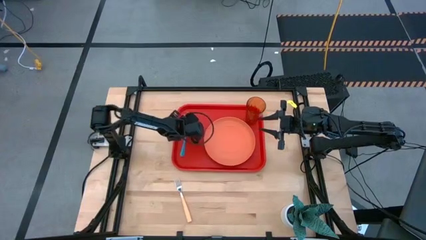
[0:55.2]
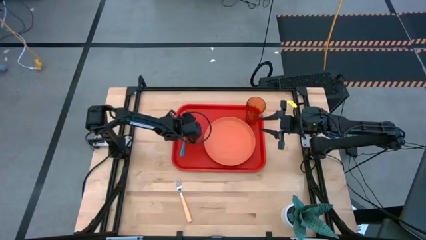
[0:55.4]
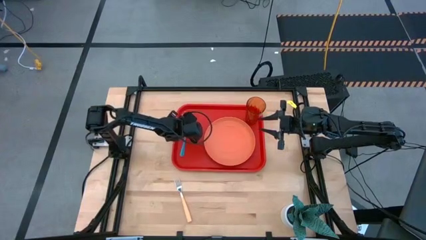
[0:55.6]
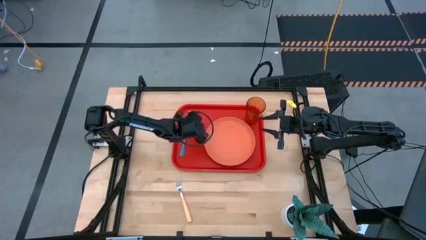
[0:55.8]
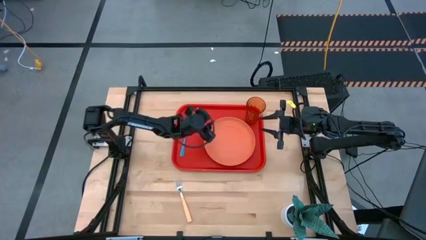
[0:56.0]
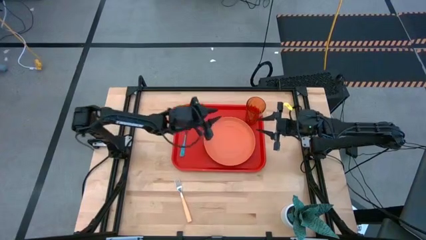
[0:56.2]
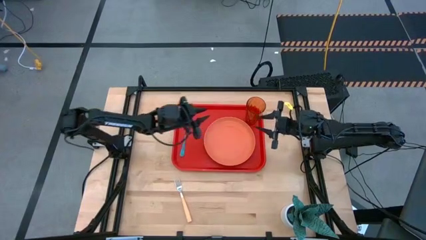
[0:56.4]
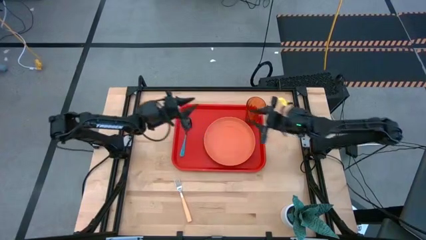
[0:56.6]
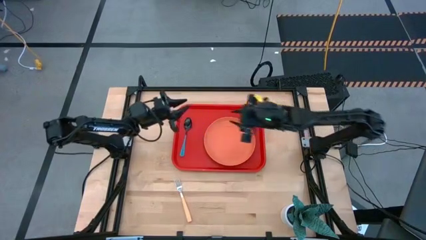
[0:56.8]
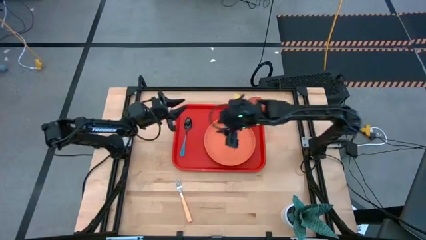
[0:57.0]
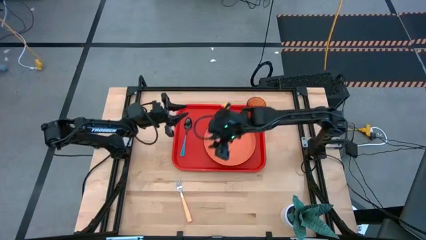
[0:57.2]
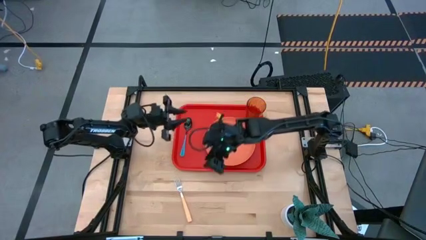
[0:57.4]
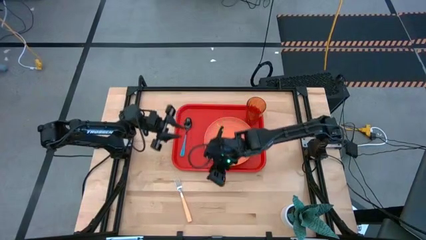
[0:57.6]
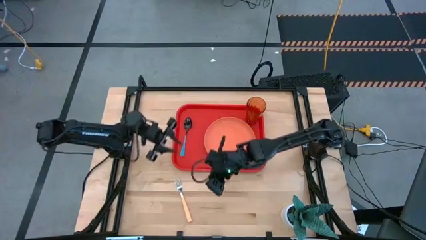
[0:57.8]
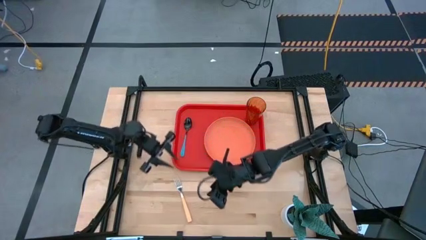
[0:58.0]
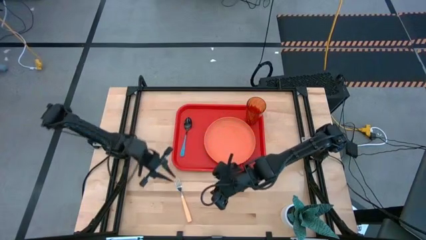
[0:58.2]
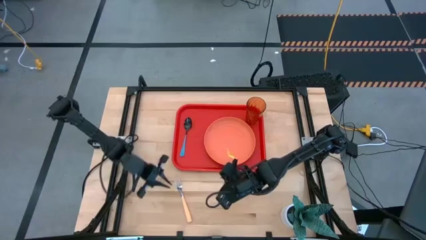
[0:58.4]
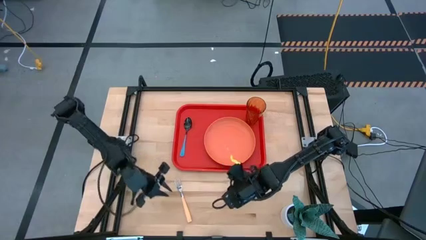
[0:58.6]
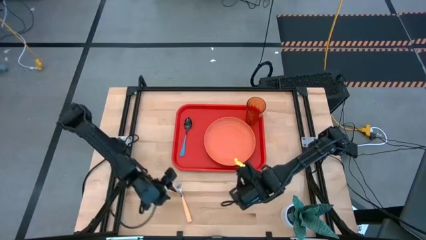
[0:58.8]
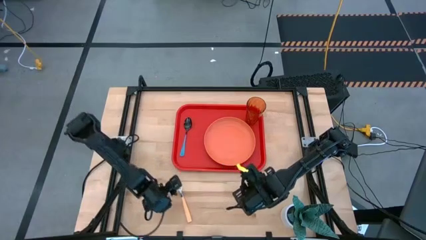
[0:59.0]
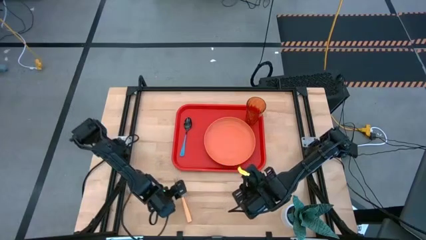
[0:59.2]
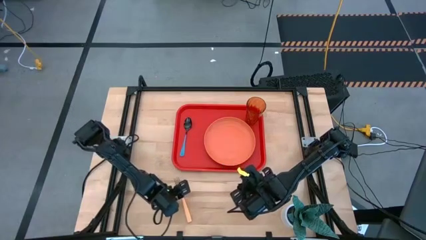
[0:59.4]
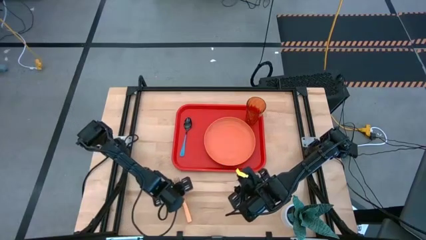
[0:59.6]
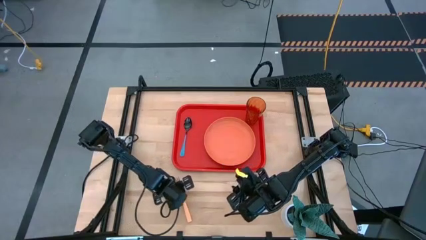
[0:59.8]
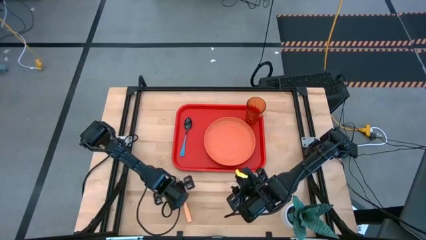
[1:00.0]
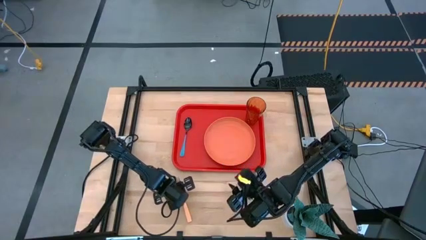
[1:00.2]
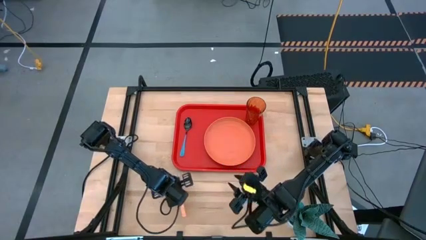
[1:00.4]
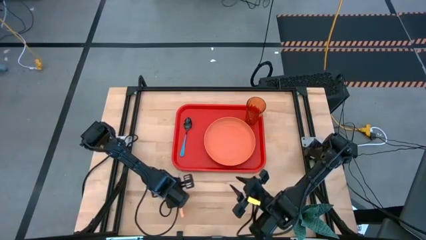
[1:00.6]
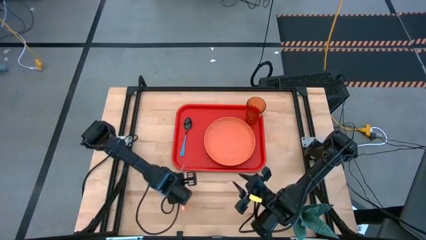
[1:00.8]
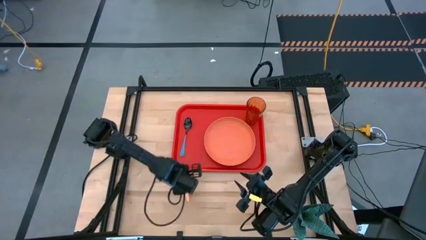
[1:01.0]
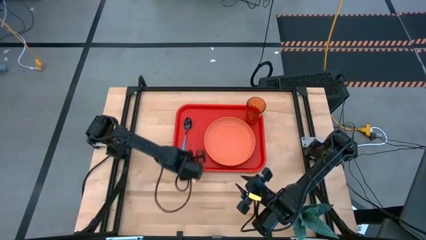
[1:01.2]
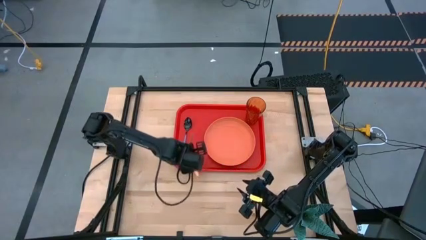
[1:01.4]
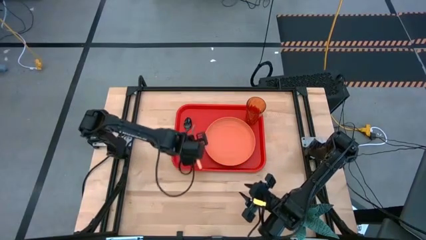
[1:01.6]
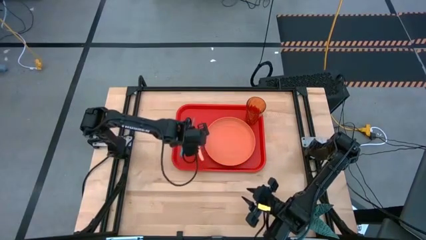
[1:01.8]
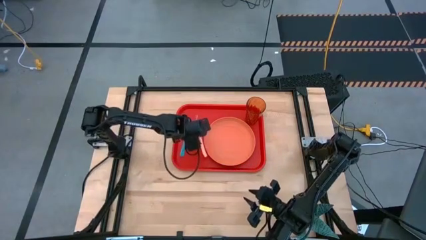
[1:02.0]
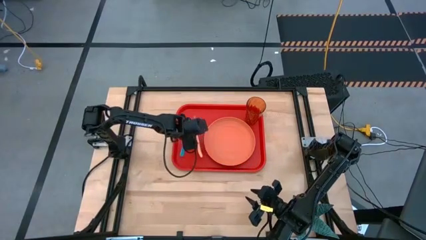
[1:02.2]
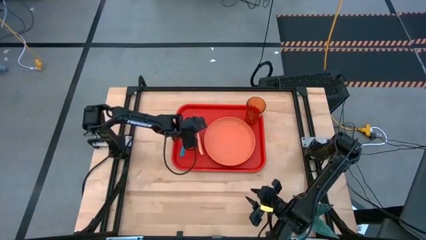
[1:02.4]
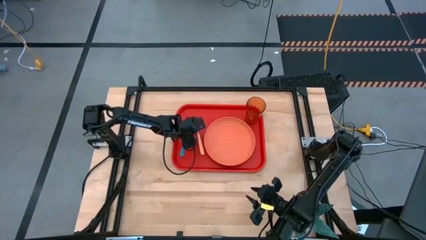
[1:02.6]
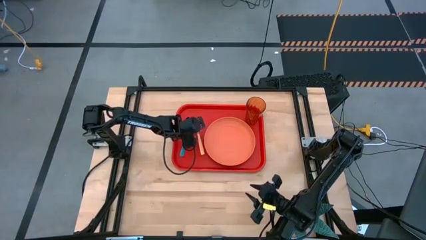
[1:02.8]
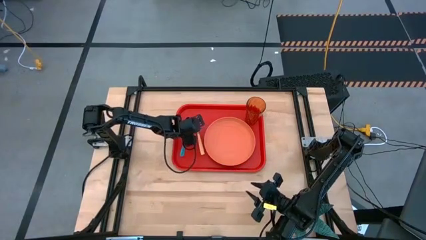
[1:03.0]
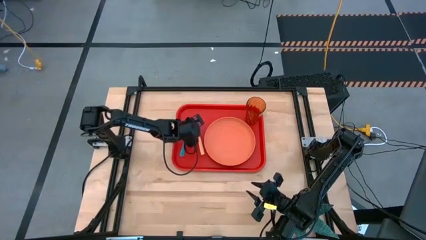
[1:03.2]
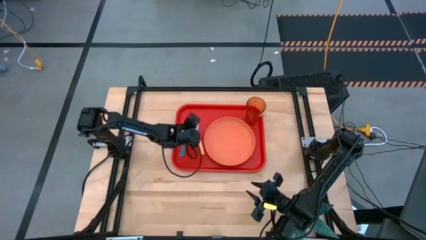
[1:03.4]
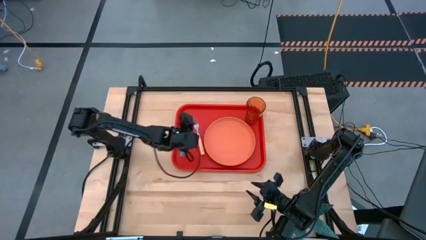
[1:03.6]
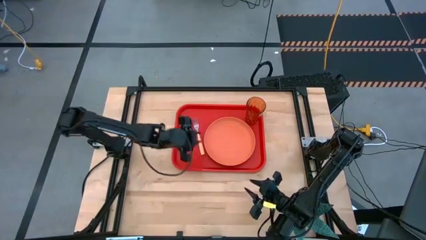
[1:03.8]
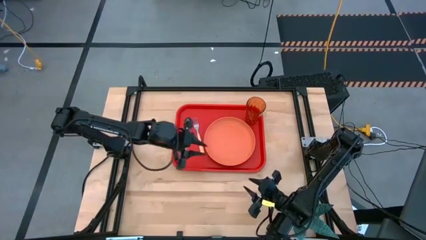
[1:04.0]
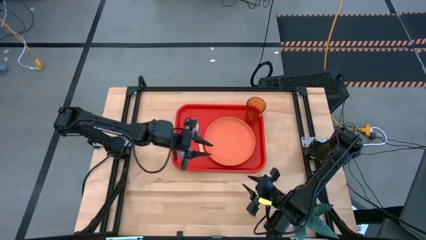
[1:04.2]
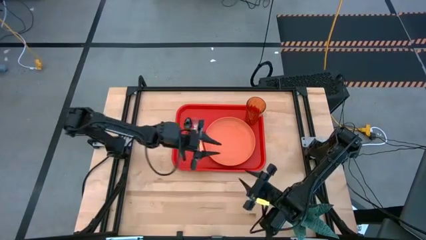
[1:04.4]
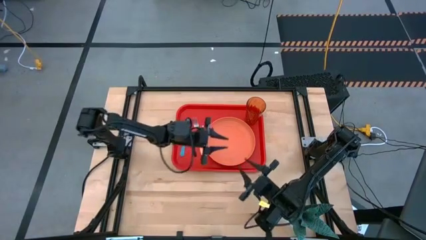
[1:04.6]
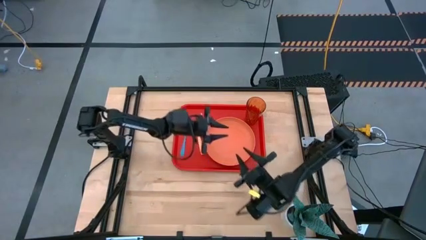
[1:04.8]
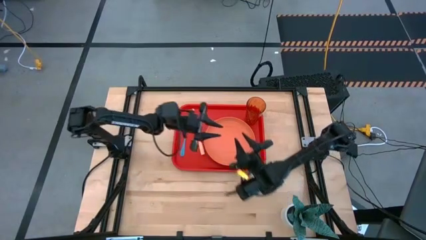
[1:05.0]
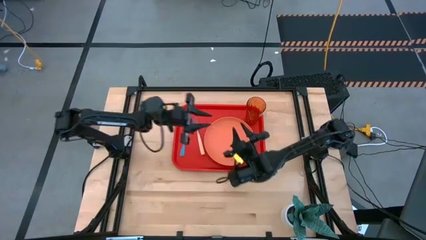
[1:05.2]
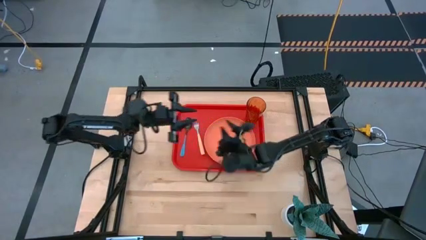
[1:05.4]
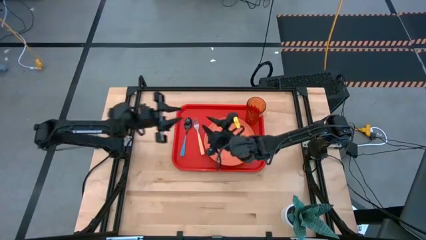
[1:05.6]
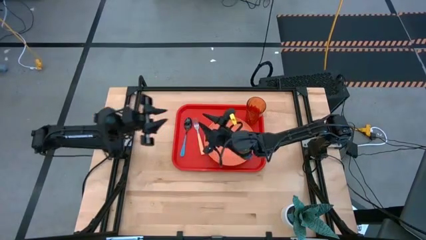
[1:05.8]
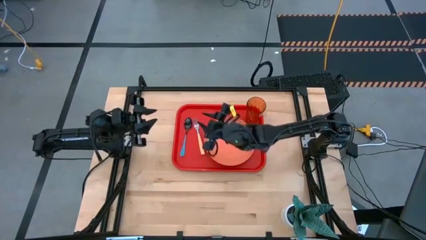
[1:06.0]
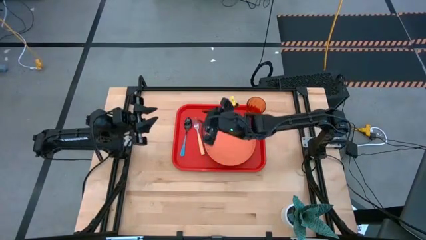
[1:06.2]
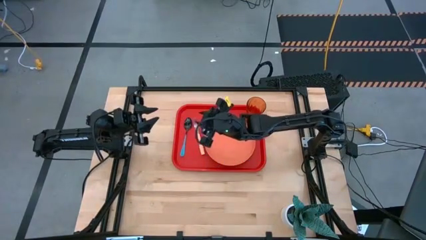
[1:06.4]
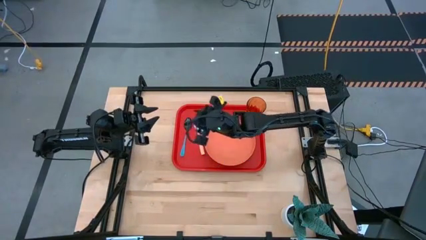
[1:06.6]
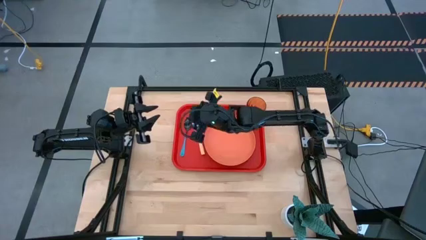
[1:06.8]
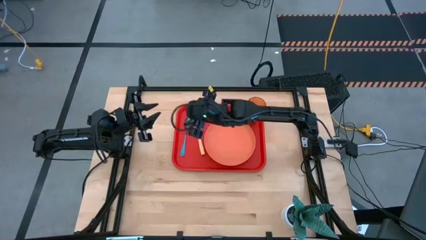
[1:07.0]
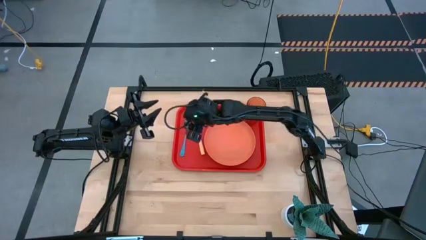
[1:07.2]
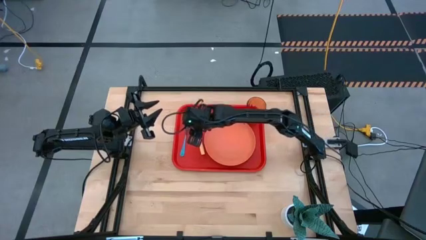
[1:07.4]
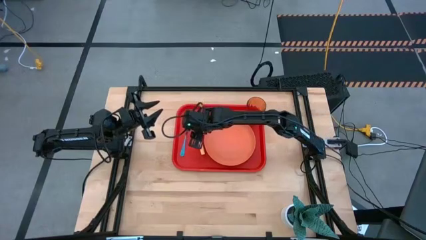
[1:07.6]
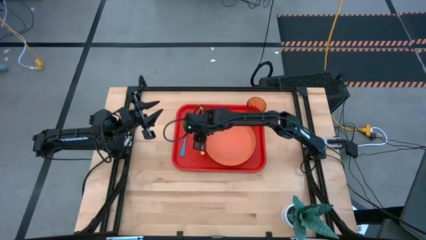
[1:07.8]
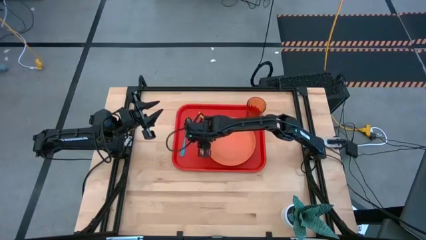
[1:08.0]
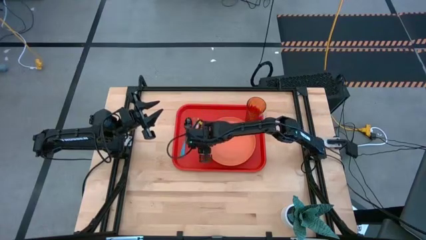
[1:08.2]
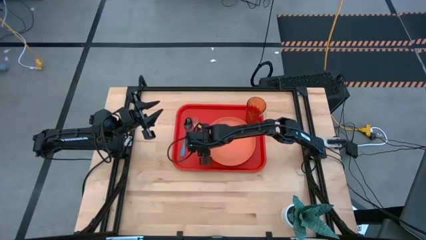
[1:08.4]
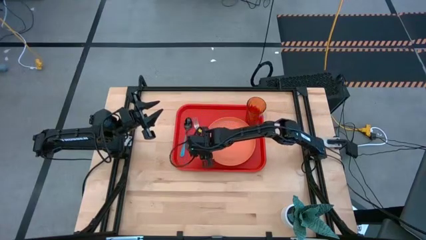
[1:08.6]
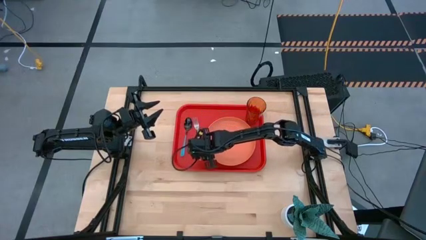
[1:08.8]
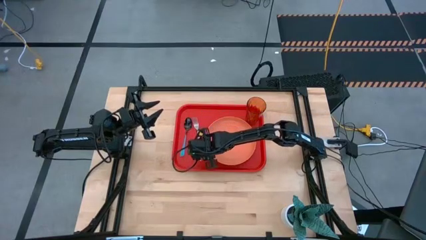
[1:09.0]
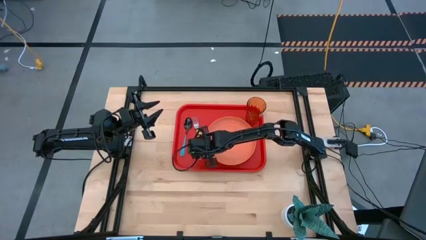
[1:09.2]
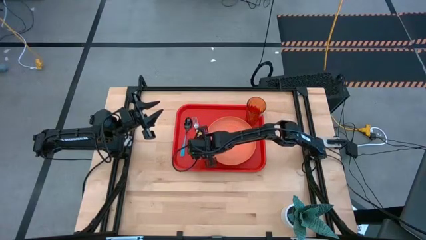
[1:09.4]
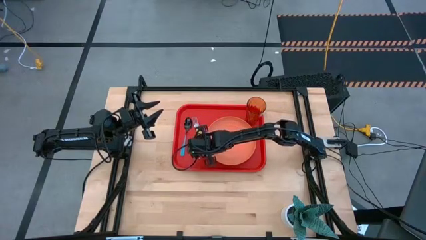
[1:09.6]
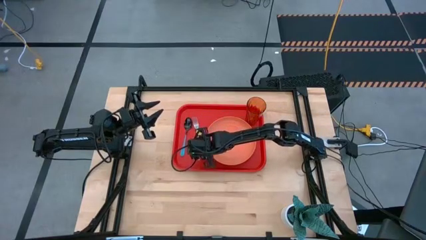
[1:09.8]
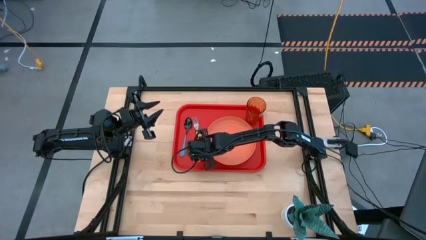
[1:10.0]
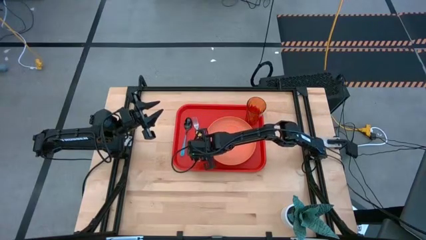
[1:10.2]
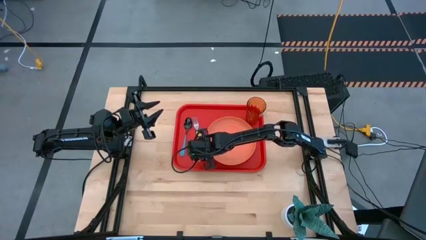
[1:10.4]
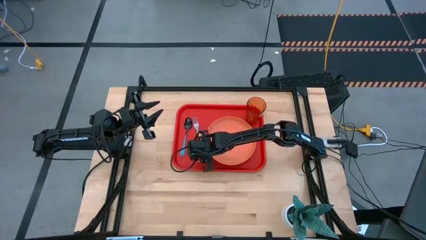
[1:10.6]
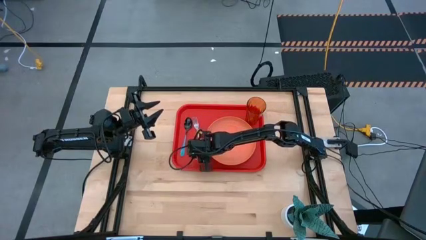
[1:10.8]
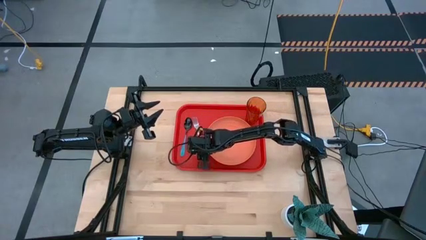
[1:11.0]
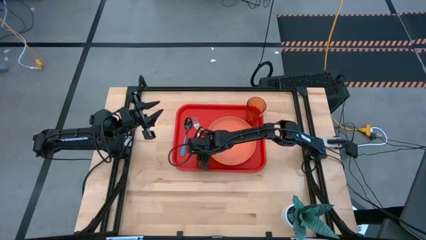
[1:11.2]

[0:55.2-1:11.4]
Task: Pick and place plate/cup/fork/spoon on tray
Put the orange fork on the red tray to the right of the blue spoon
